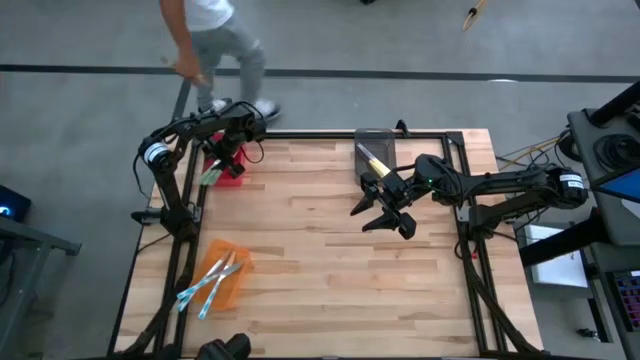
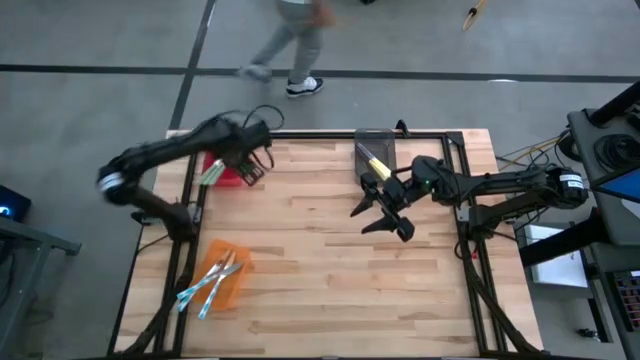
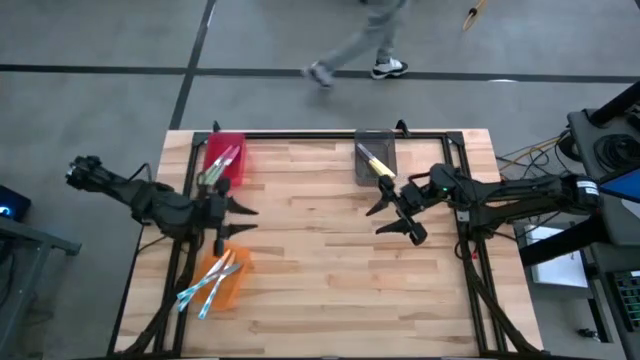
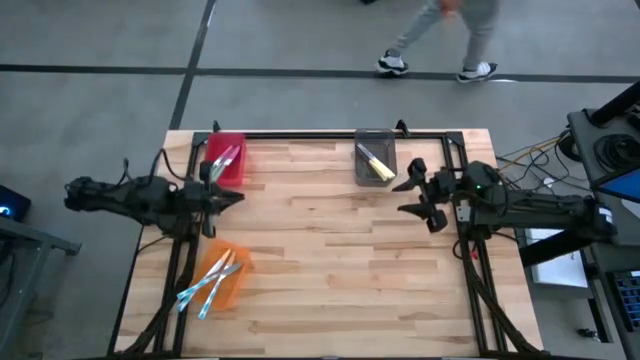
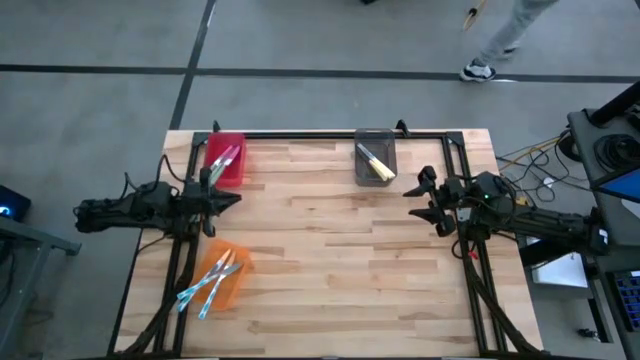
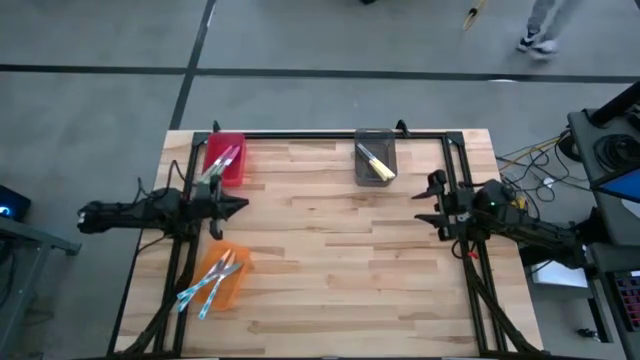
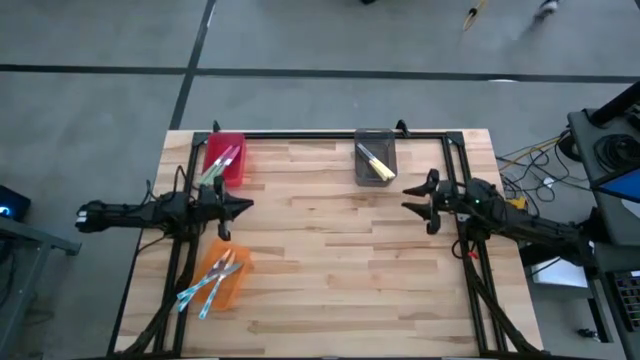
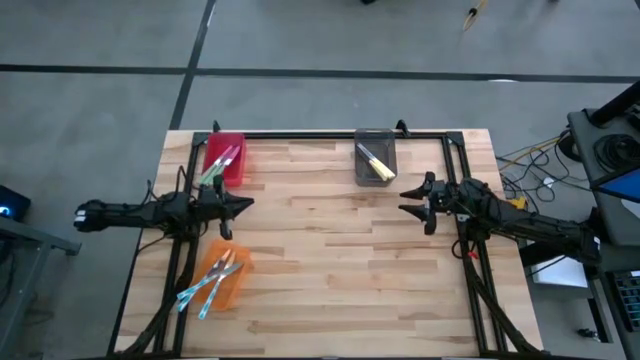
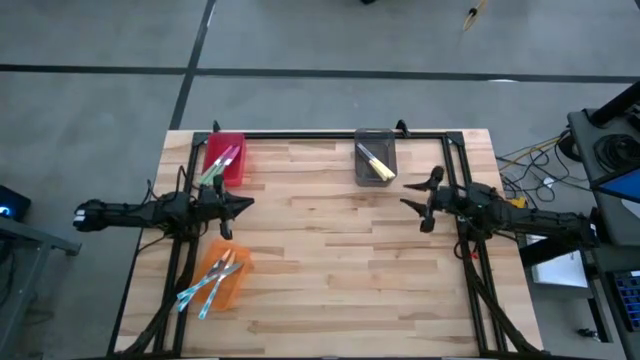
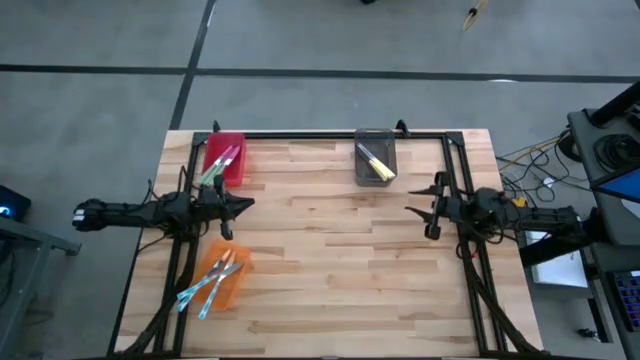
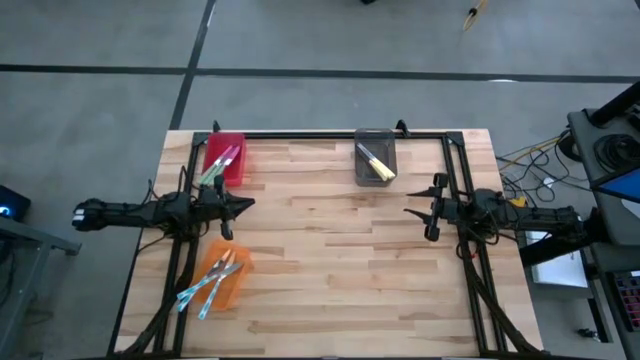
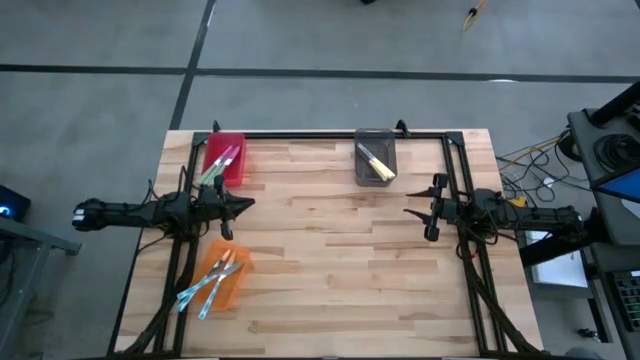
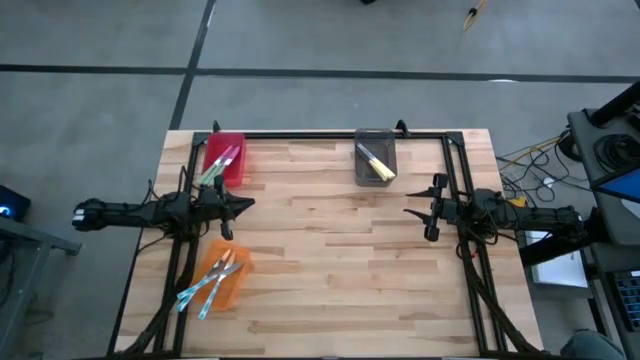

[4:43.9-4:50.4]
Task: Sort silverware by color (type)
Return to Home Position

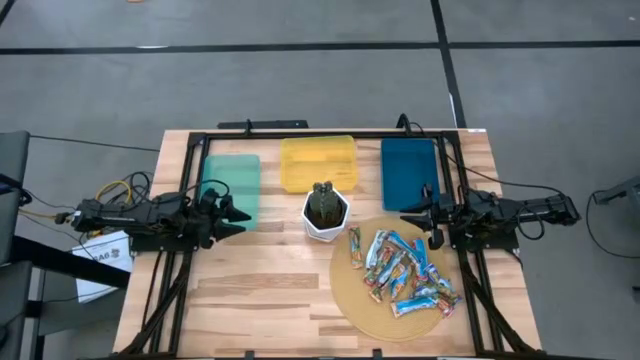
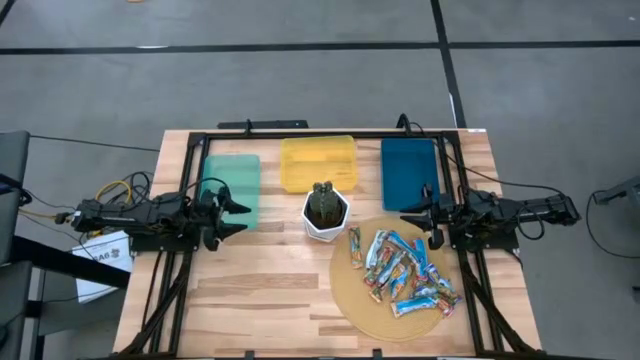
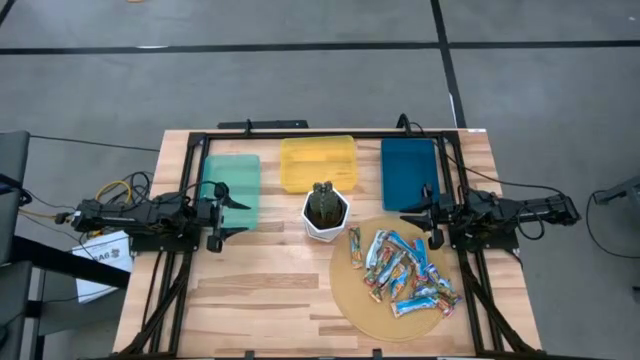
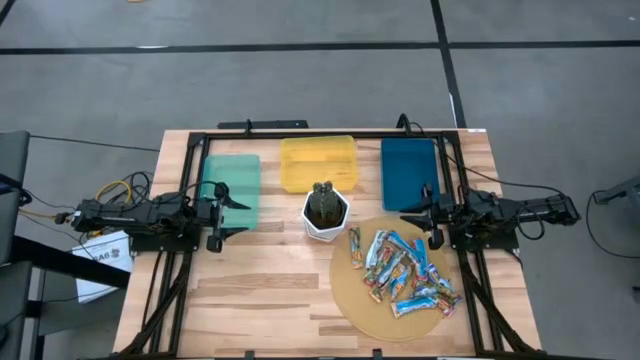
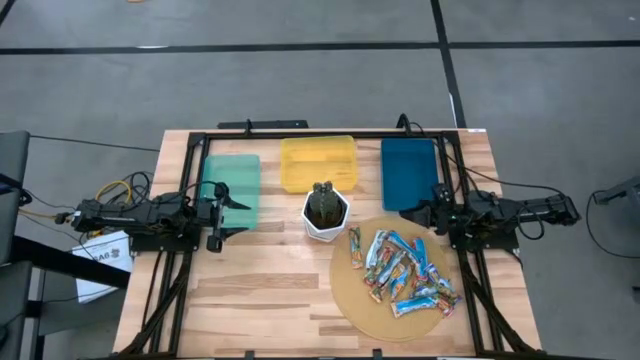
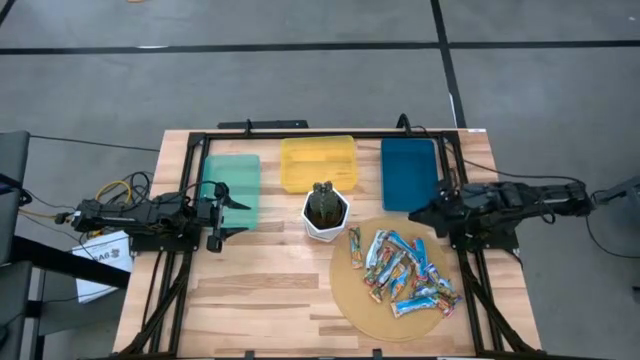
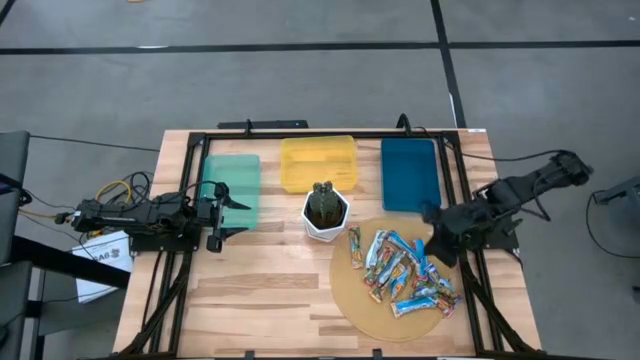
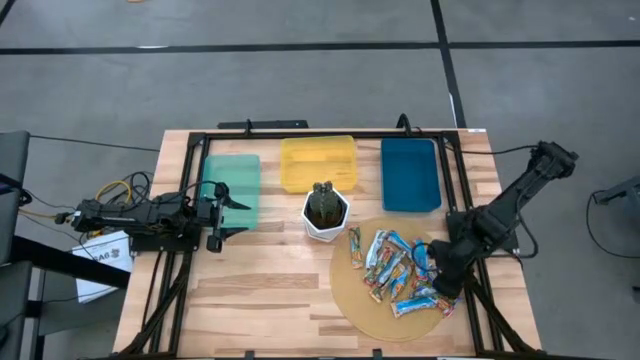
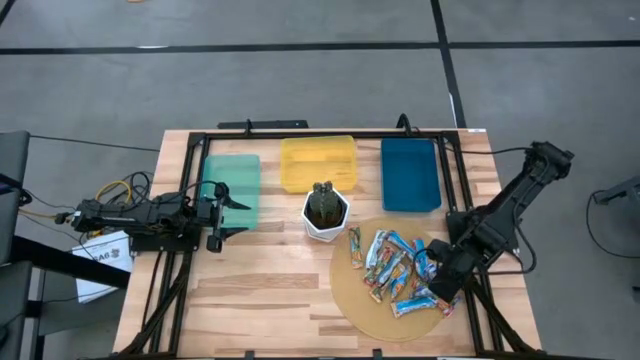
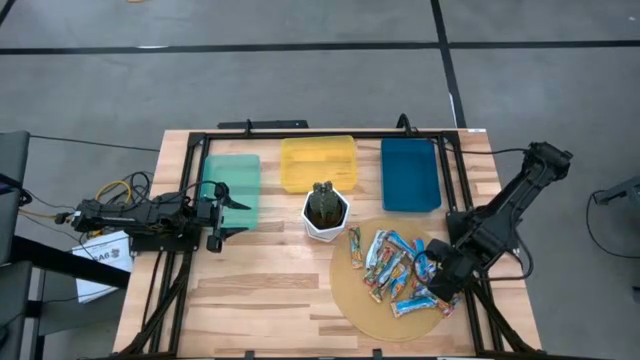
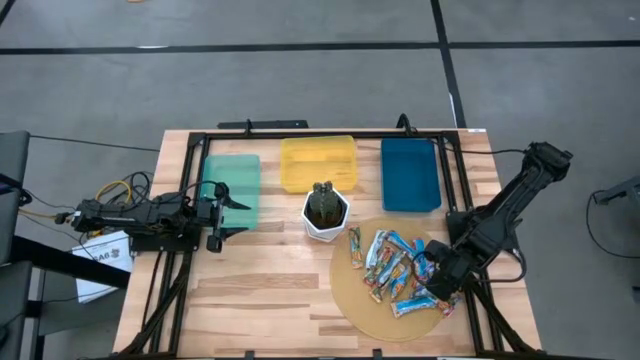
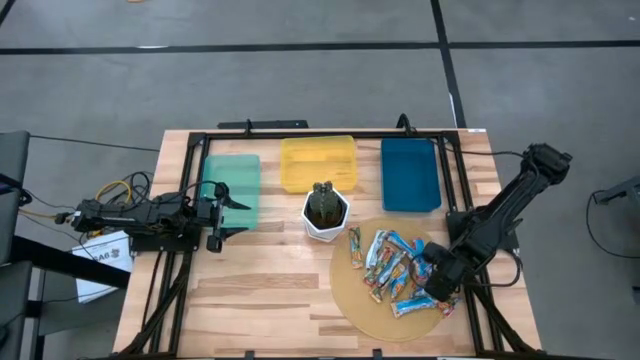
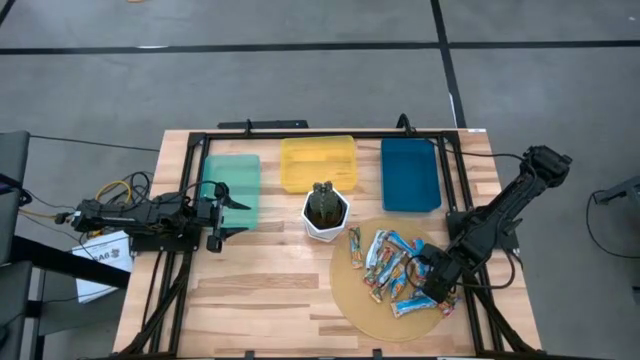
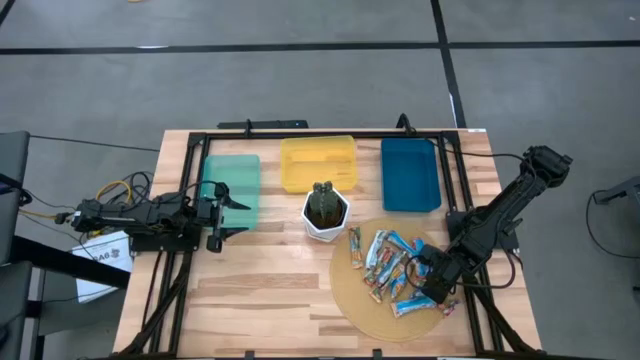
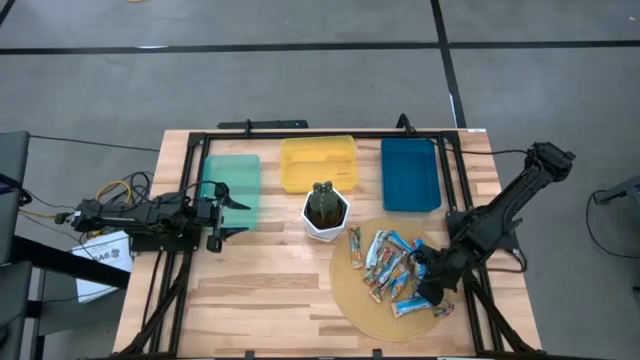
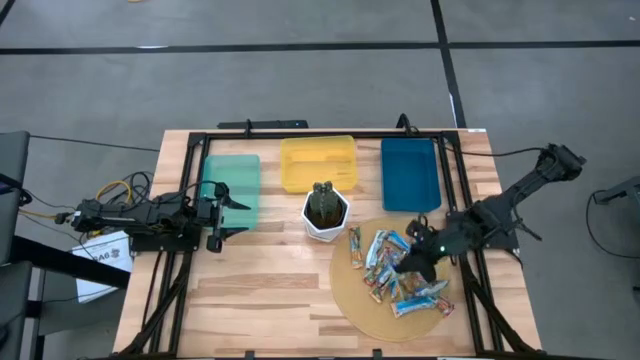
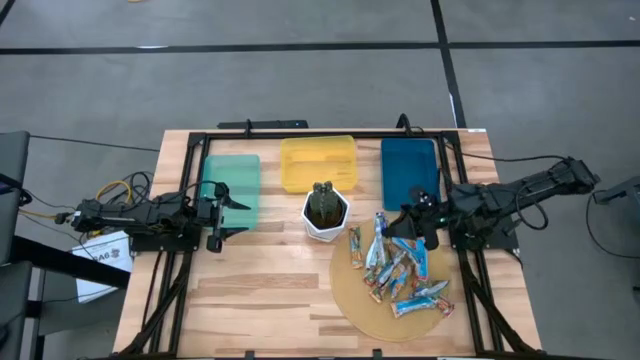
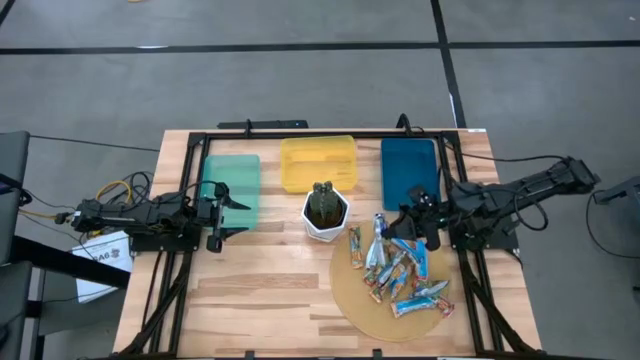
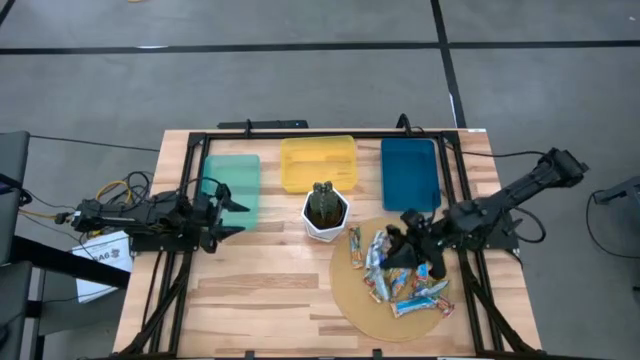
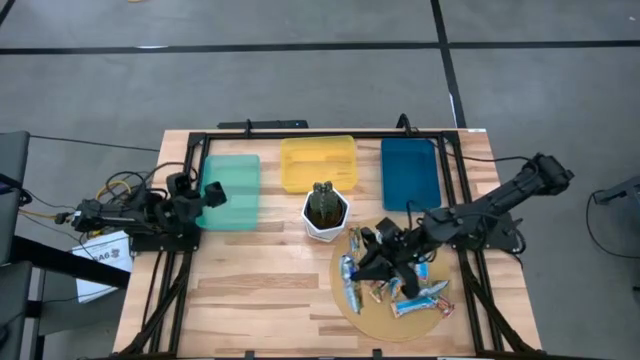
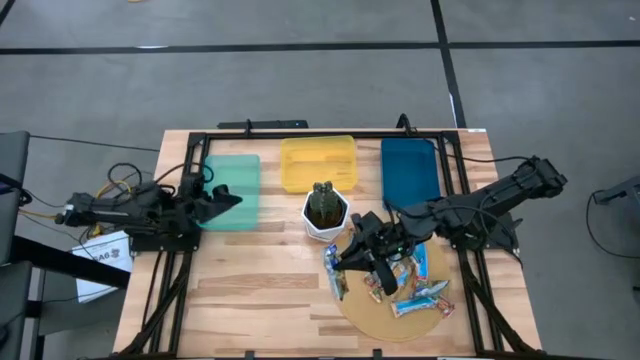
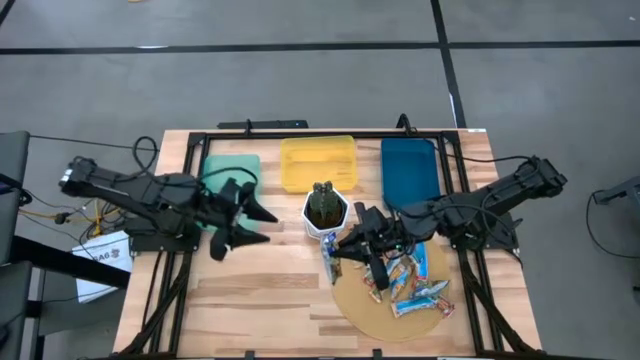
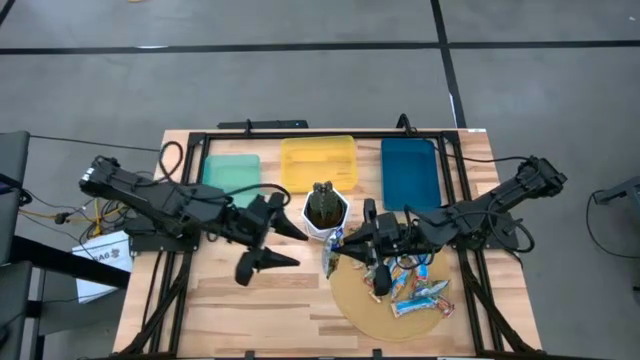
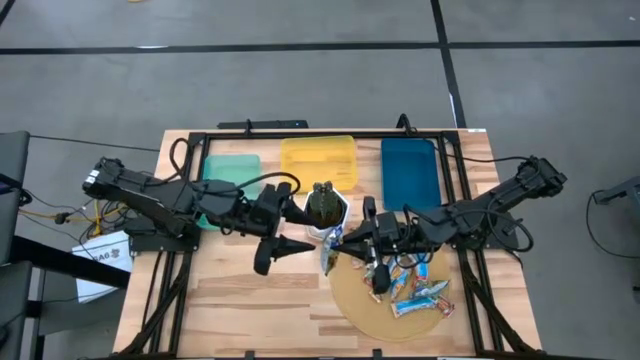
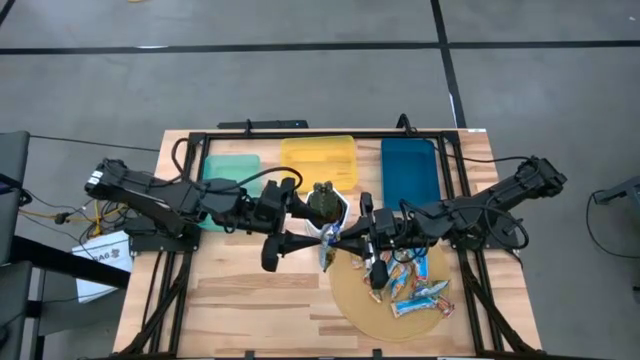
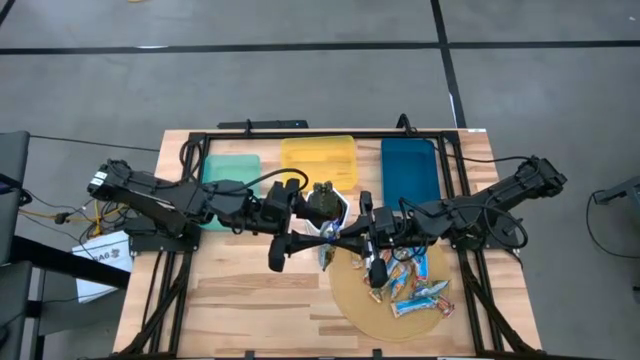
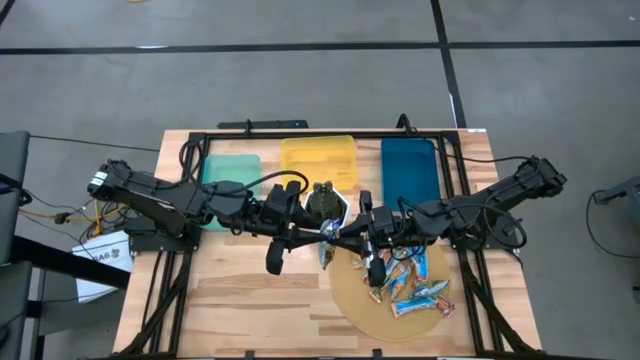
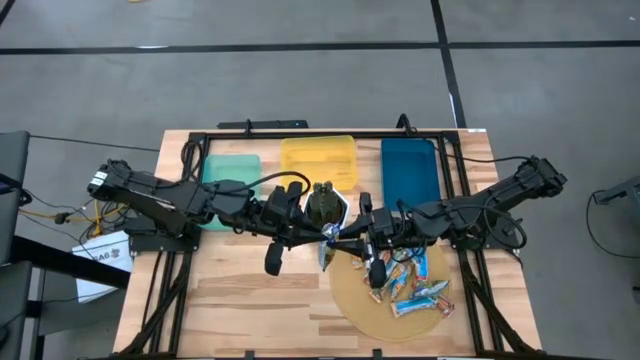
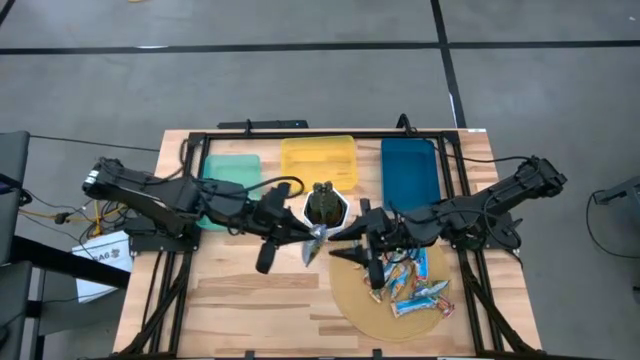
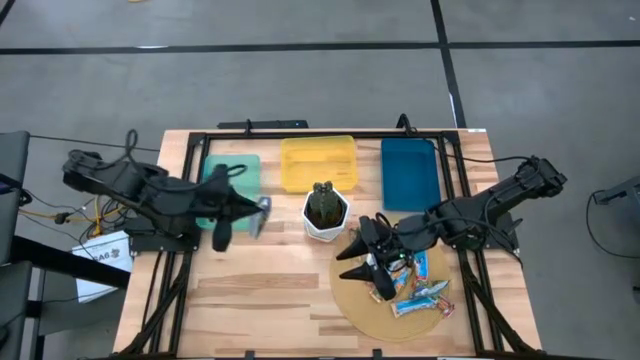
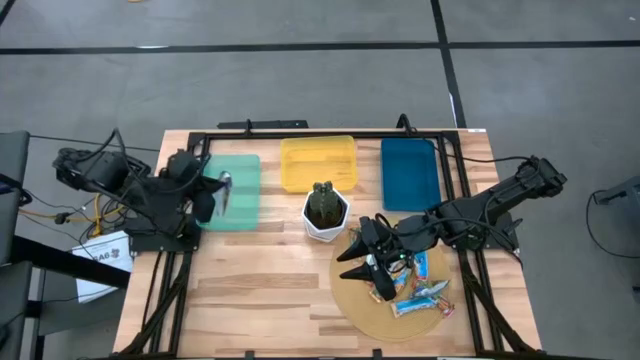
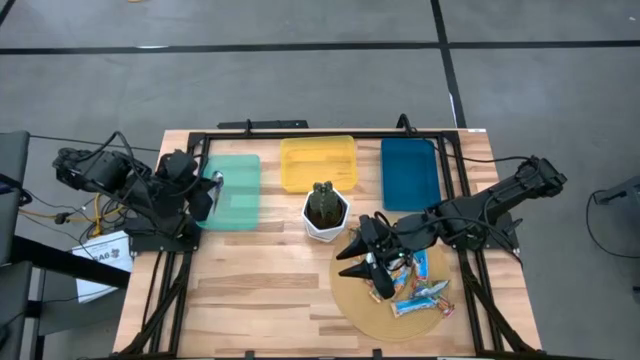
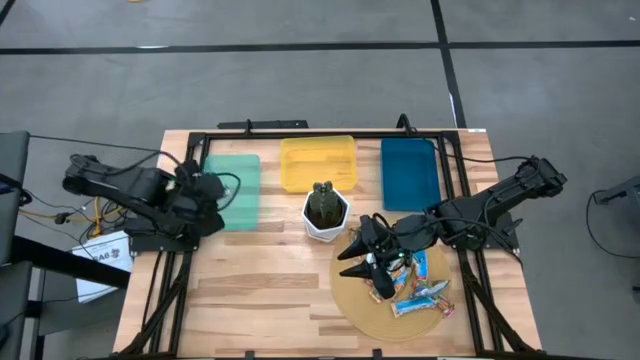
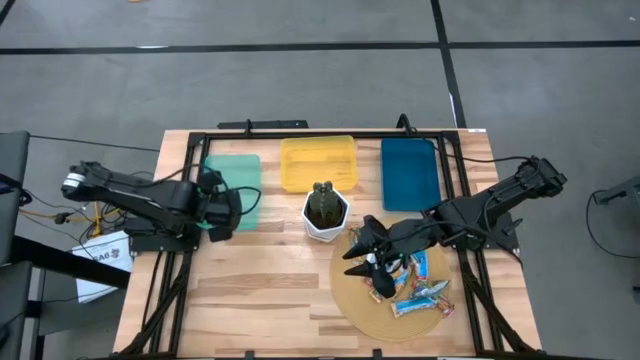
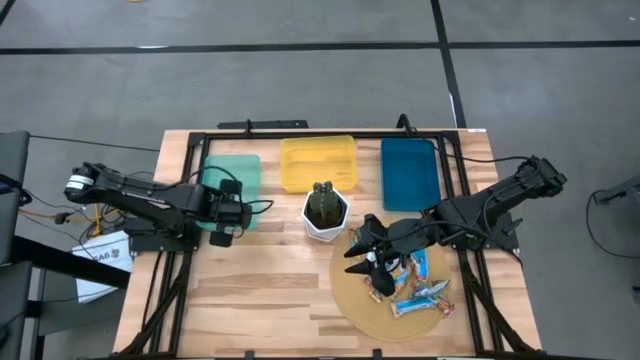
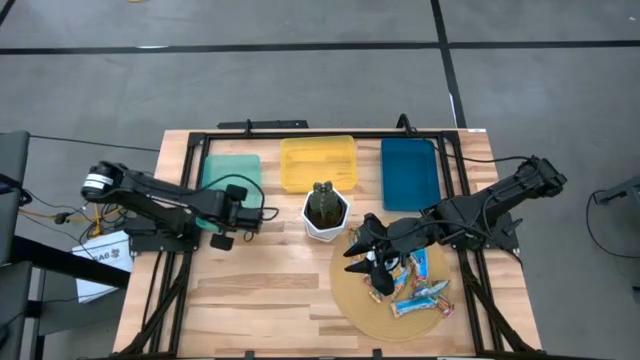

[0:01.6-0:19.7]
Task: Pick and place Granola Bars by type
Put the blue granola bar into the green bin
